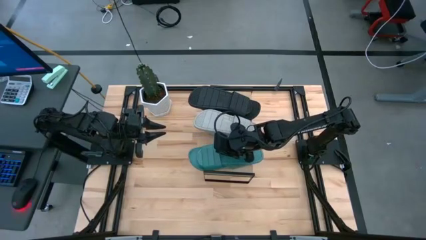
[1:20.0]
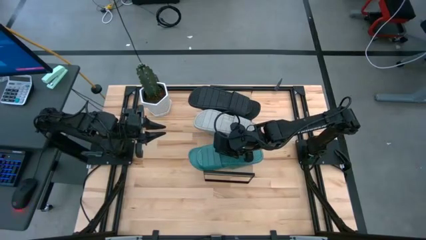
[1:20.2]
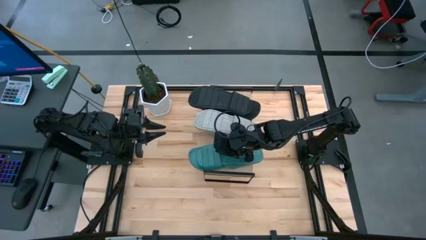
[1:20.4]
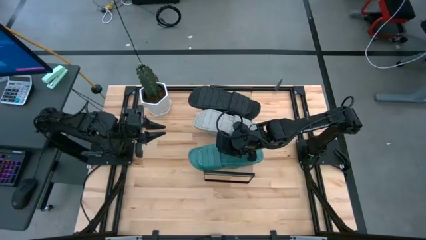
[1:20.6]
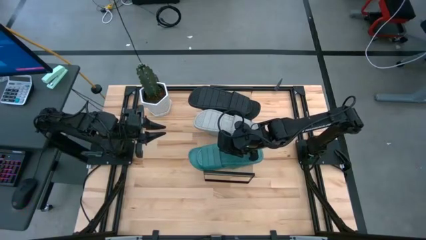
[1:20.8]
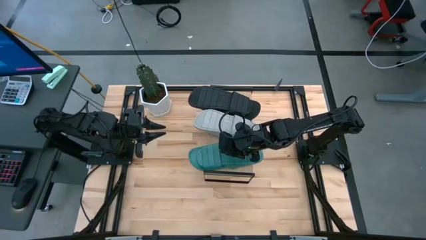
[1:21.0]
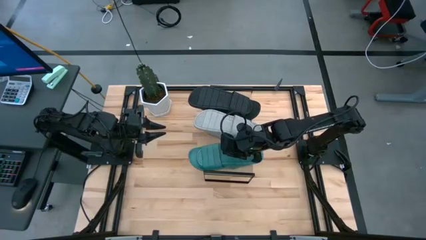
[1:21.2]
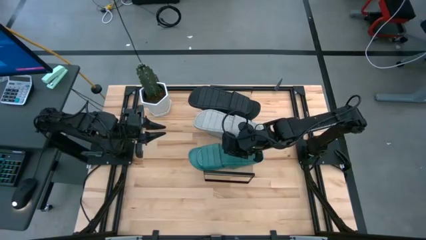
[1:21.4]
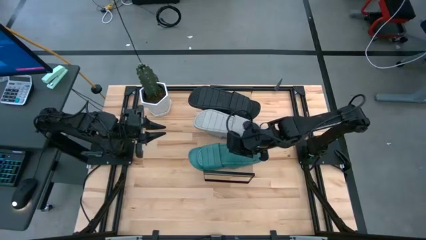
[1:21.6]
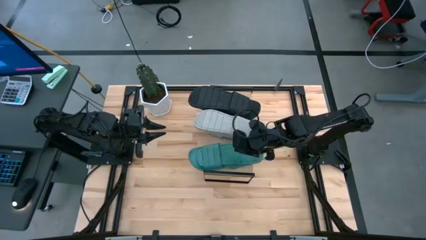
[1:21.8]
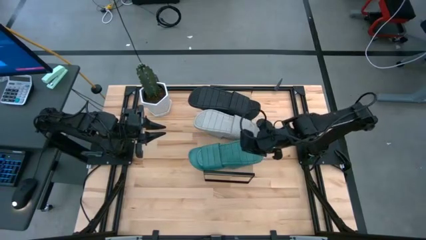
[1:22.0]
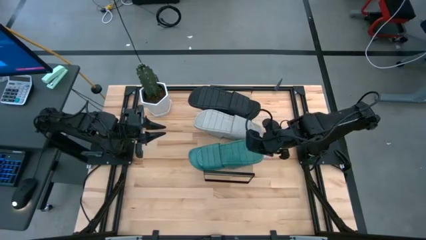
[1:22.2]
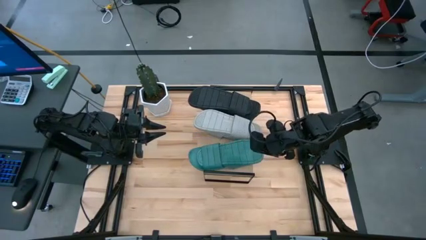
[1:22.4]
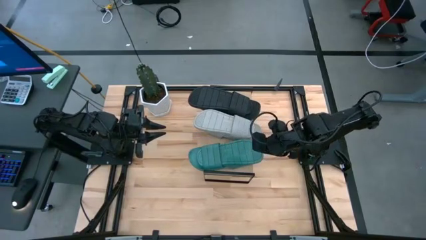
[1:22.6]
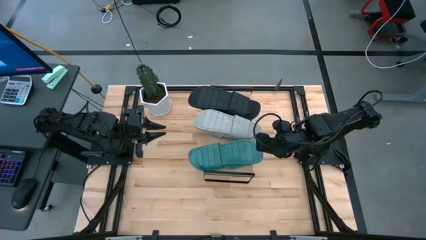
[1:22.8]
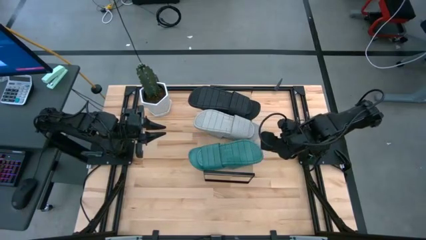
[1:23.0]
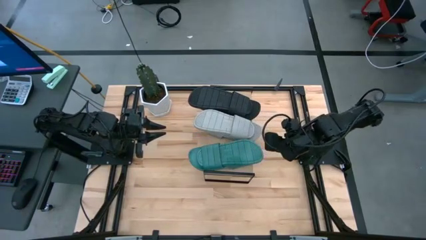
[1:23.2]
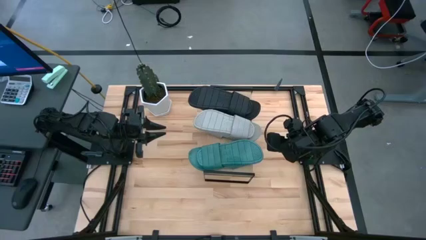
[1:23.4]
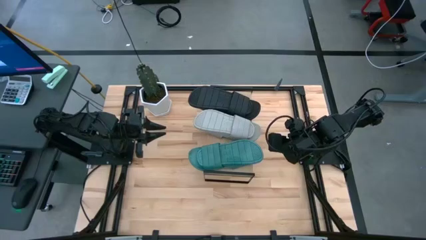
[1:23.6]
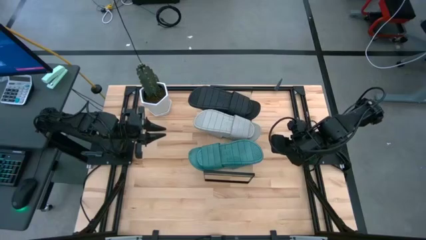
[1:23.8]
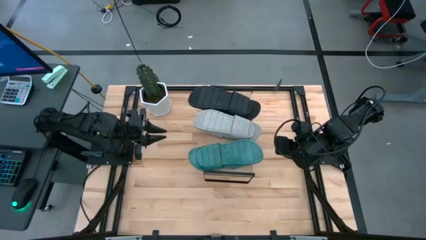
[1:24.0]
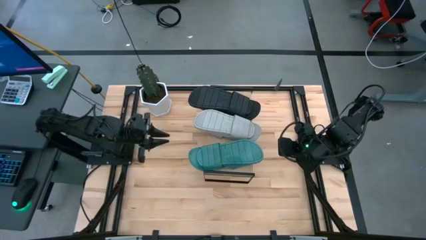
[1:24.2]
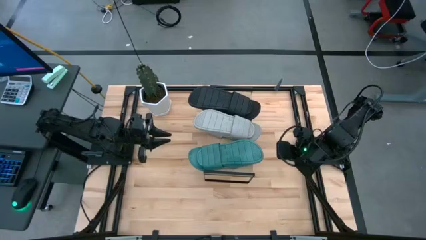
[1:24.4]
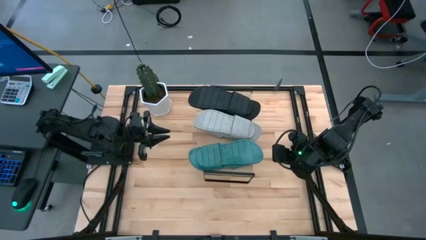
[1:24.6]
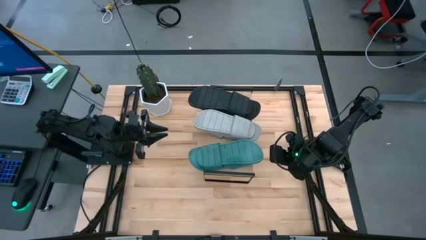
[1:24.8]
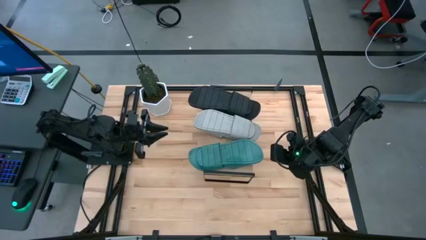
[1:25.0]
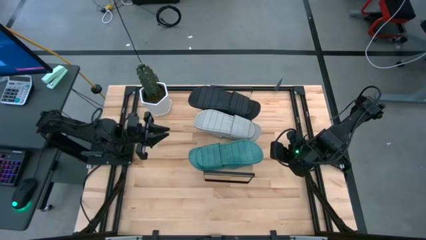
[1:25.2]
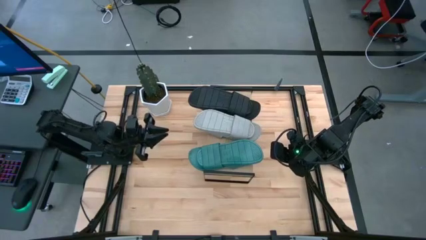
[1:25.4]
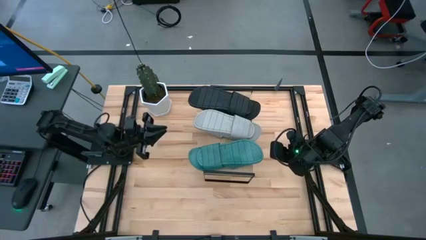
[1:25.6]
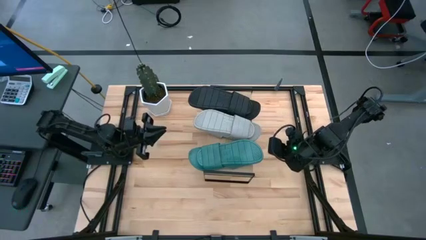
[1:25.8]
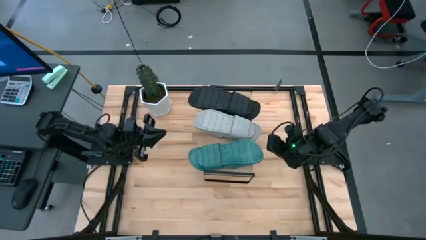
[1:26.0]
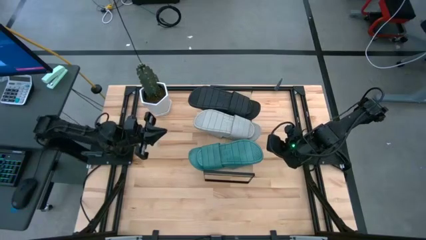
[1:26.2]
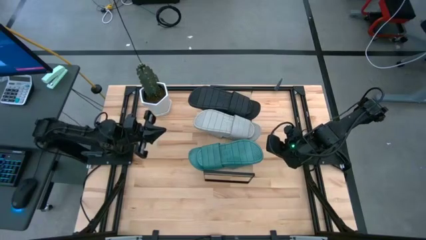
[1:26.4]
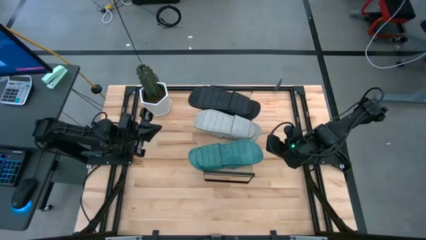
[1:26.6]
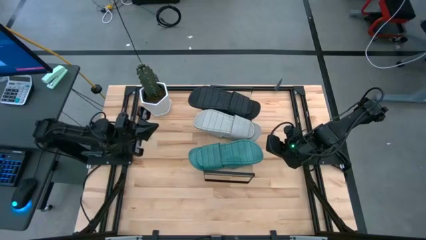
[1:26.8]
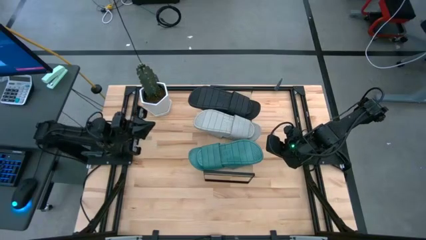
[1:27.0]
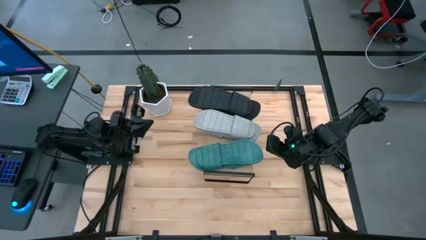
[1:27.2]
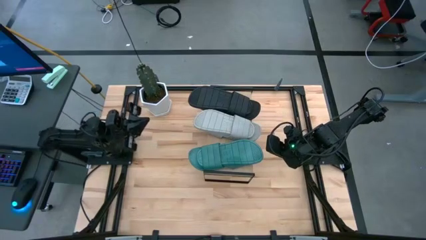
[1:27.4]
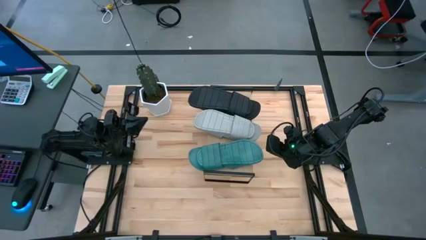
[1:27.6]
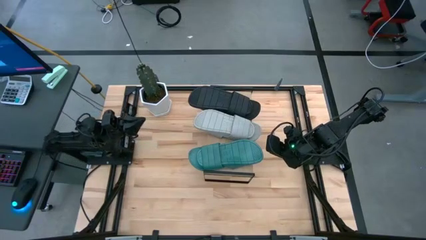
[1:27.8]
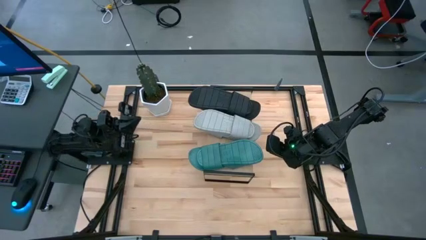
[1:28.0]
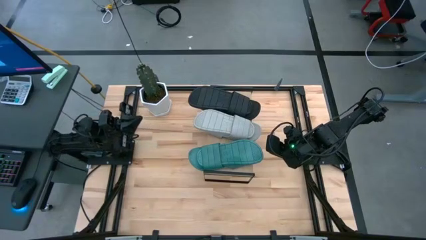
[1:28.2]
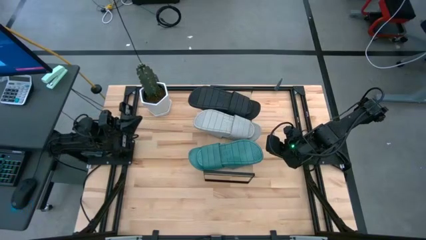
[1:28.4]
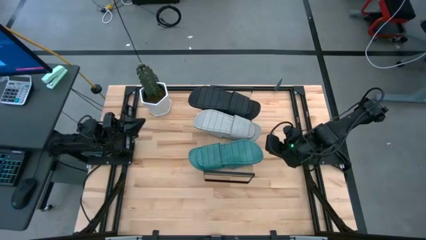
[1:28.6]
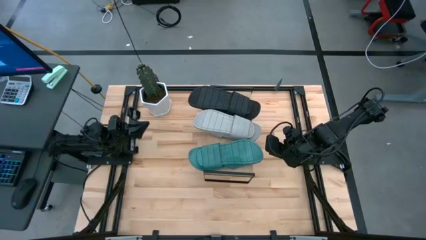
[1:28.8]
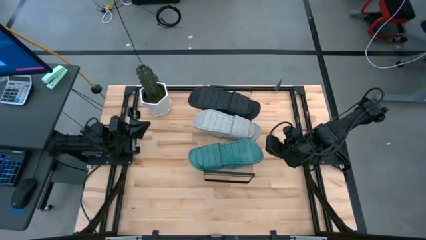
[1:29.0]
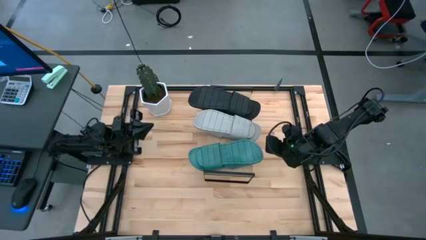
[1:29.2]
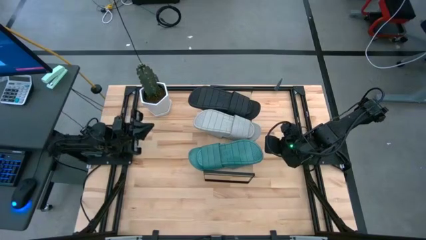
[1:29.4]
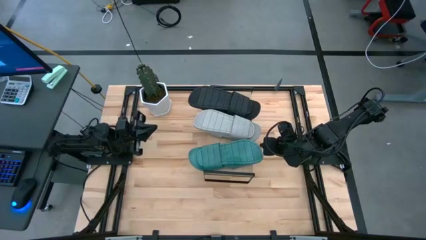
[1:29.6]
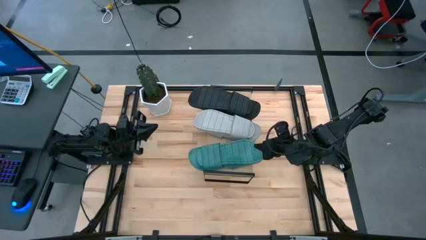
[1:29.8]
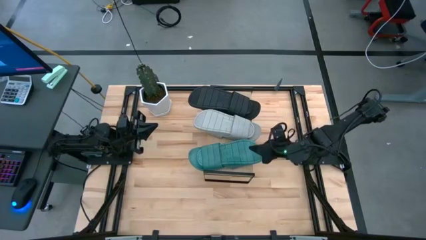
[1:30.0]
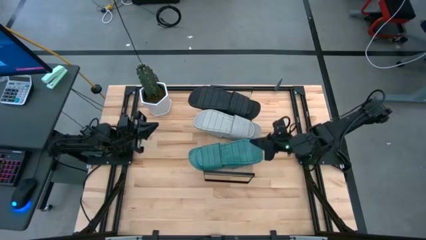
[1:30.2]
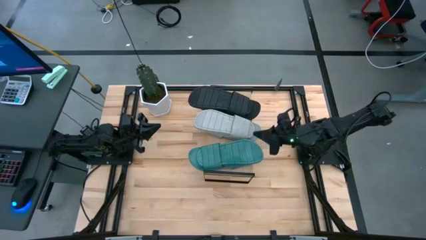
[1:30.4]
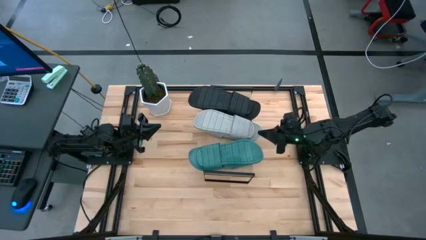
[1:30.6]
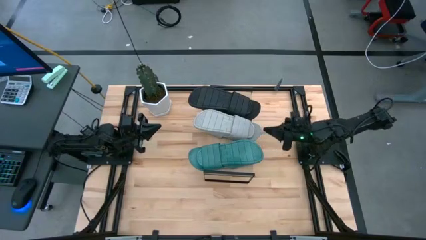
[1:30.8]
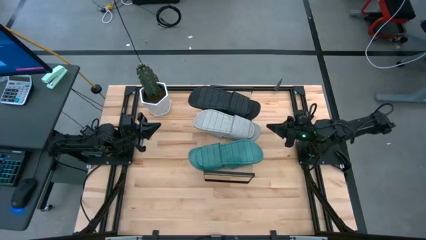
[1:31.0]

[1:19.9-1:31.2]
Task: Pick and place slides into the shelf
Return to Home Position

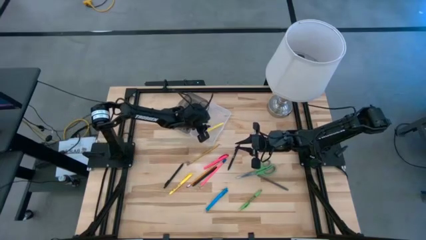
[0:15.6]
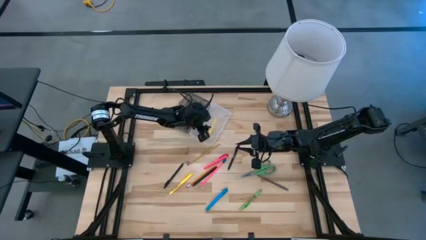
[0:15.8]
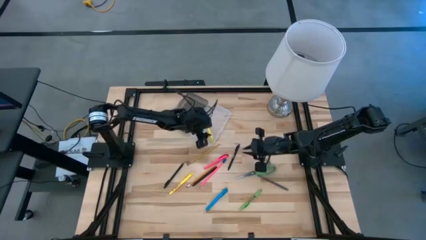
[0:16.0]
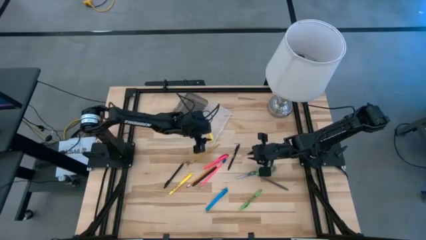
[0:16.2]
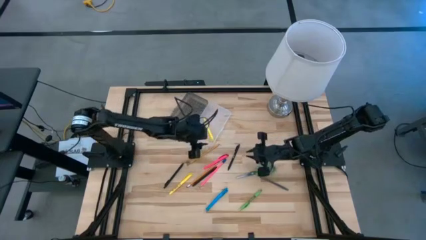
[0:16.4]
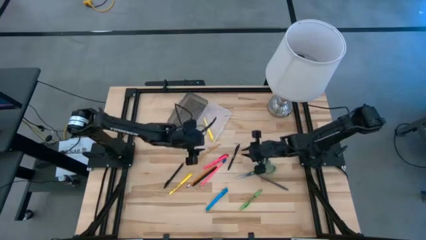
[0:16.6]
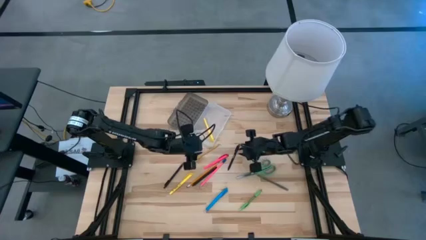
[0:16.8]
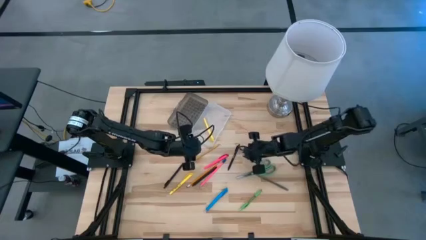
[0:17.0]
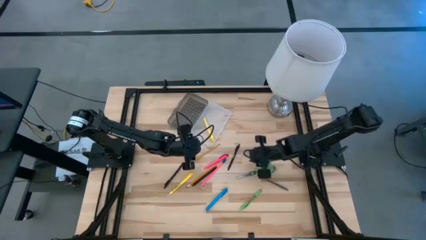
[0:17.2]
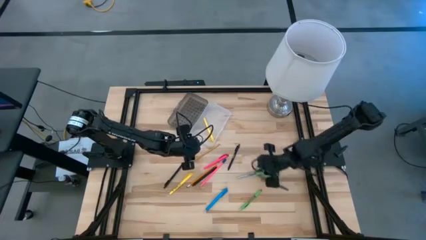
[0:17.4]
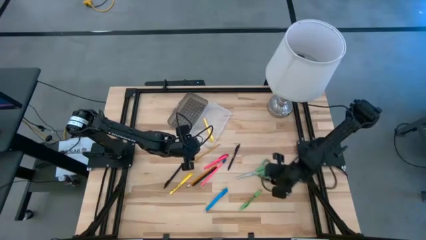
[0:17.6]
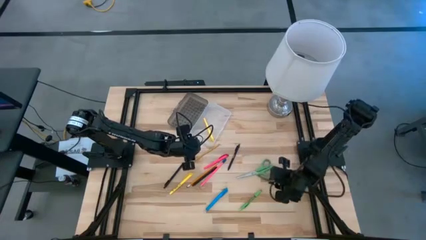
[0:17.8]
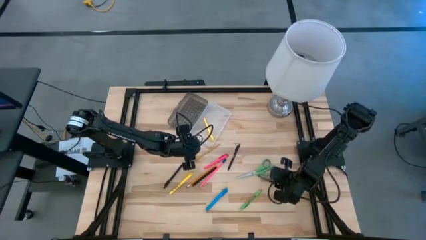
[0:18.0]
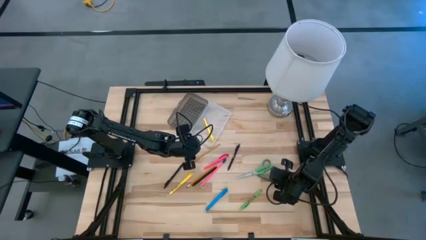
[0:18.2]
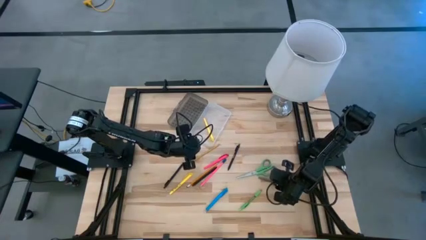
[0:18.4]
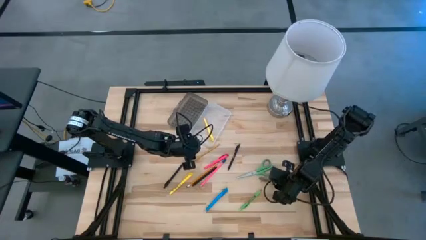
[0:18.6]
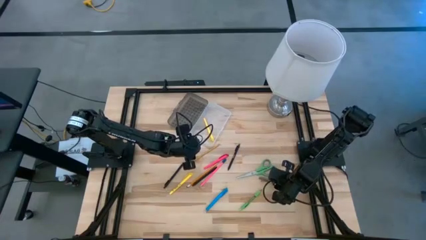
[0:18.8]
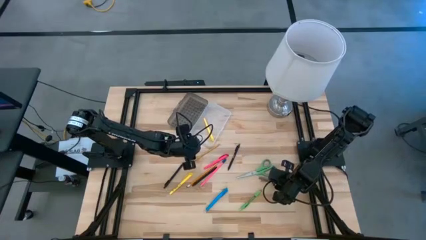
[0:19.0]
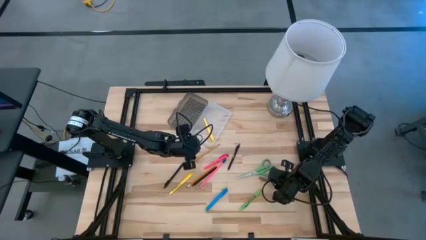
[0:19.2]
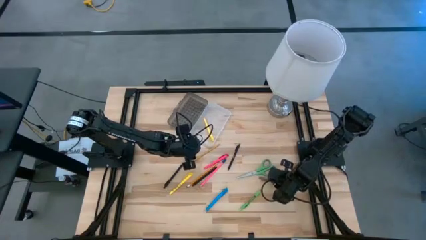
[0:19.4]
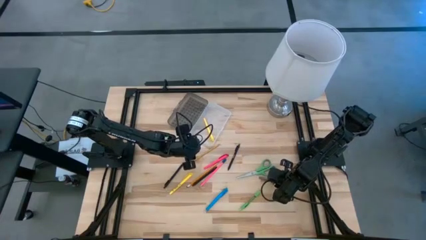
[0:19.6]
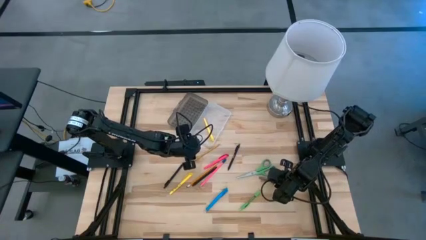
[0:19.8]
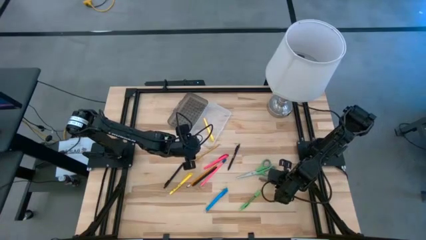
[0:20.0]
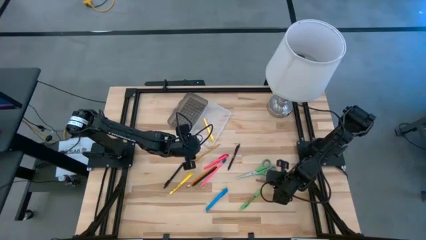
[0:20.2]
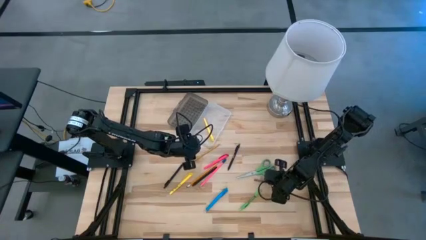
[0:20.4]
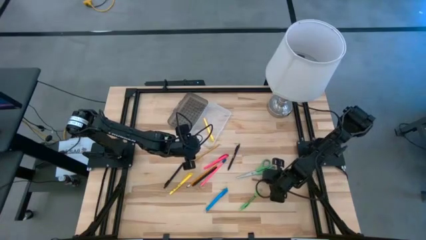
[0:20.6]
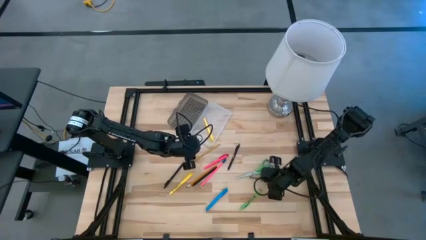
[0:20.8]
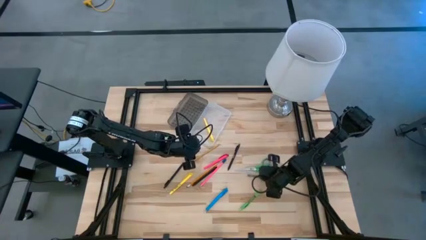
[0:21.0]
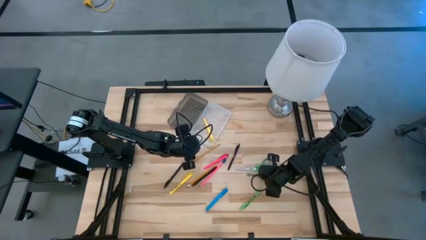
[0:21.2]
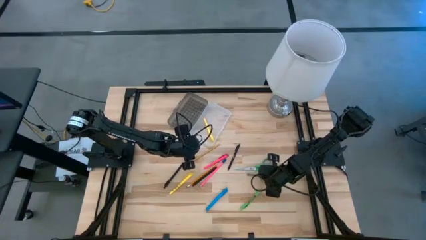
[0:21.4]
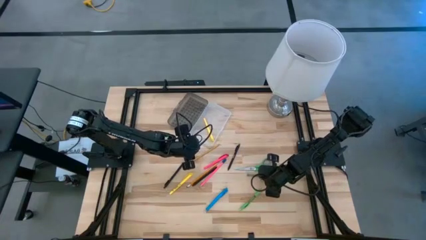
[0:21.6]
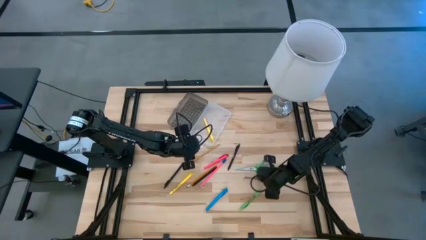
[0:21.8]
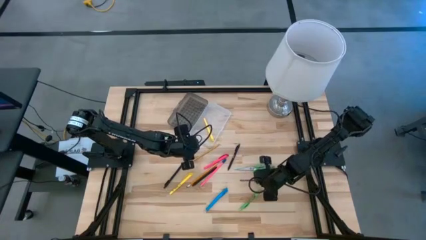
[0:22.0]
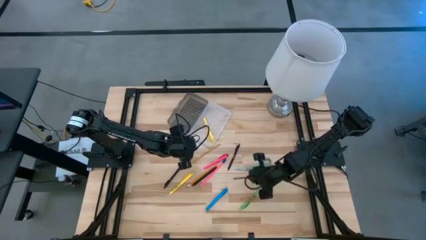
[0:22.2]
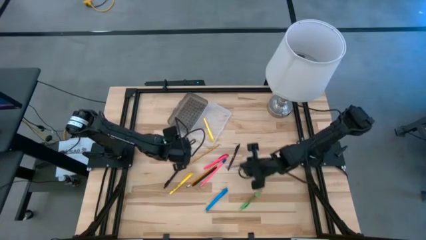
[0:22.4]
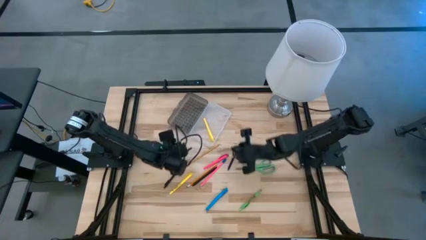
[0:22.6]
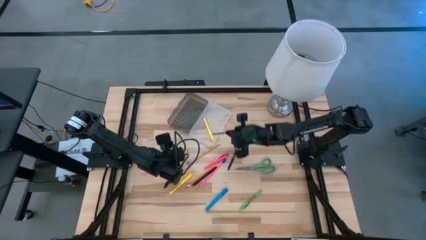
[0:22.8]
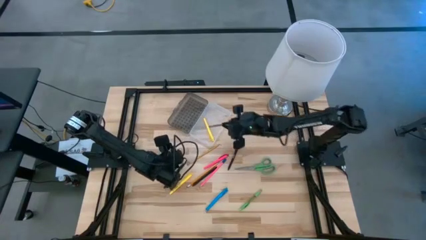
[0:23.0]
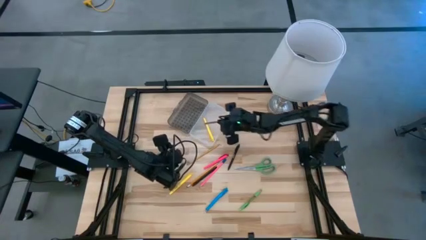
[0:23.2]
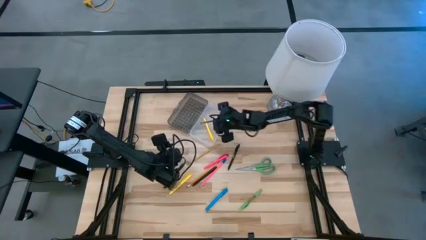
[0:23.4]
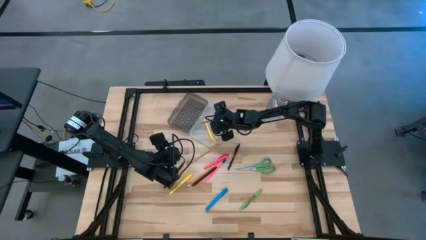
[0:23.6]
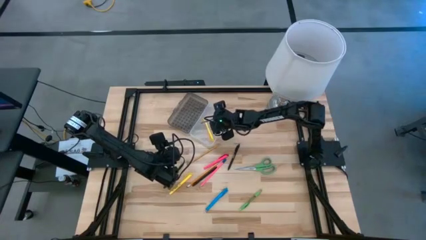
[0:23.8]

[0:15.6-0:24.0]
Task: Pick & place school supplies into a supply box
Put the gray pen into the supply box
